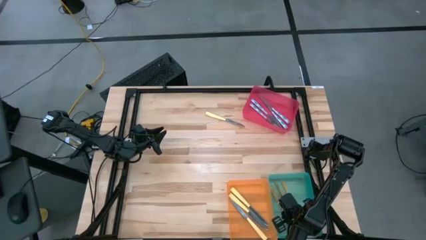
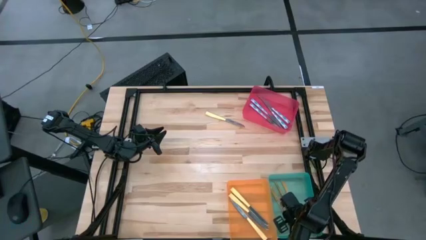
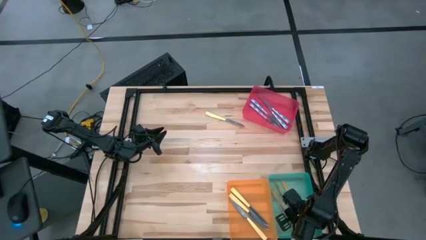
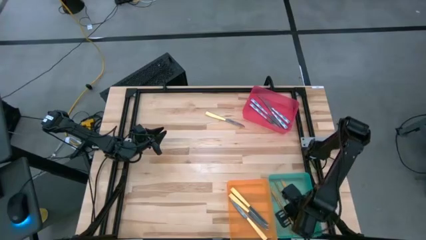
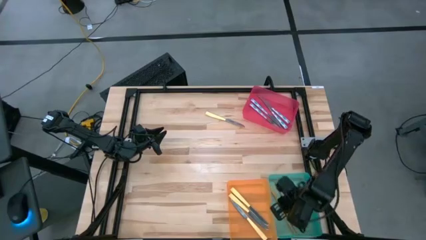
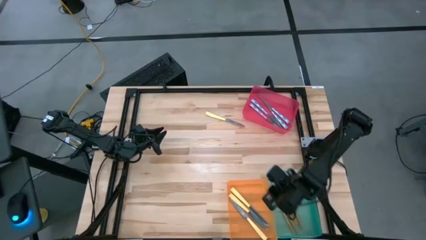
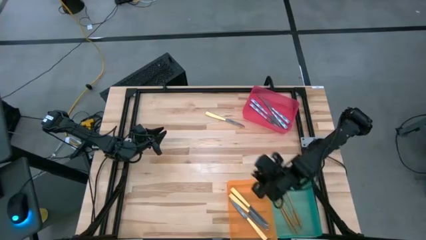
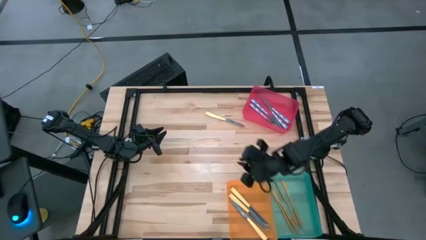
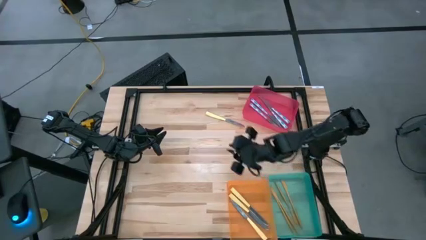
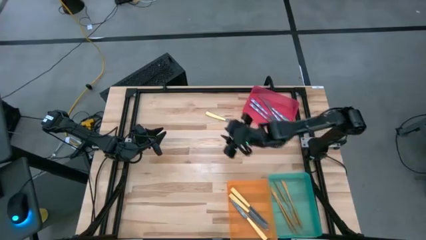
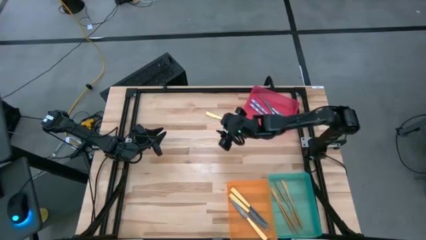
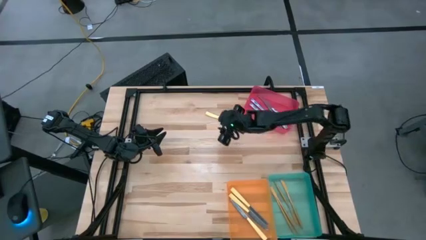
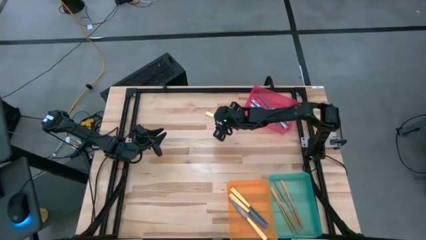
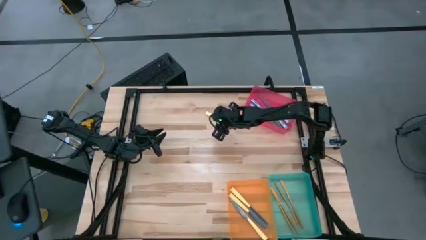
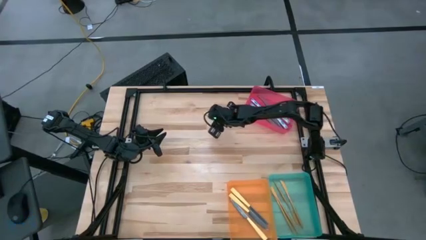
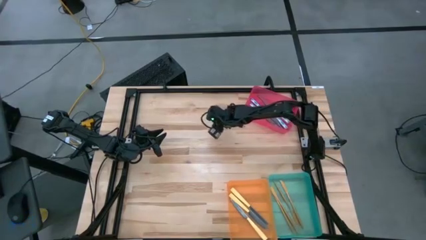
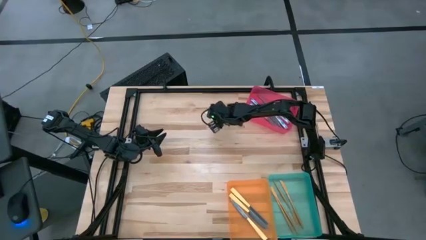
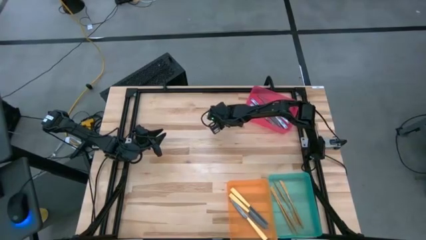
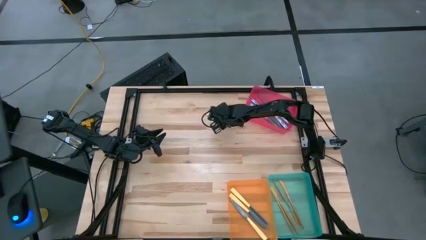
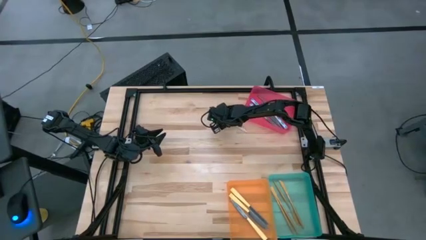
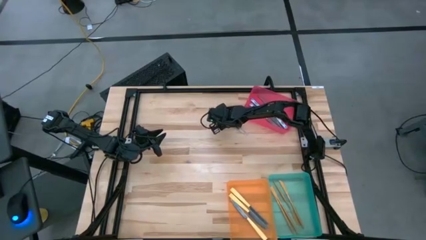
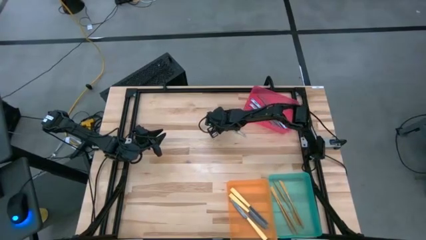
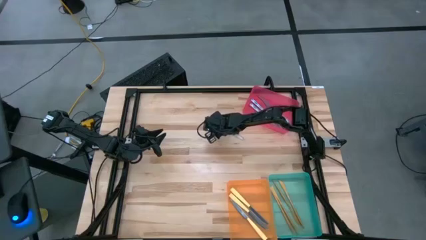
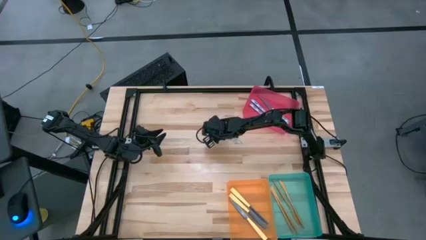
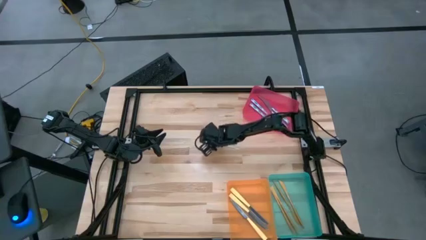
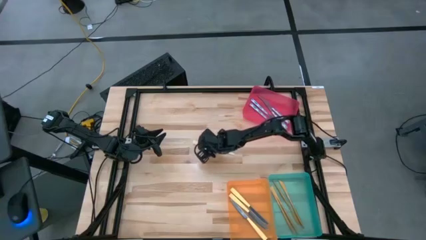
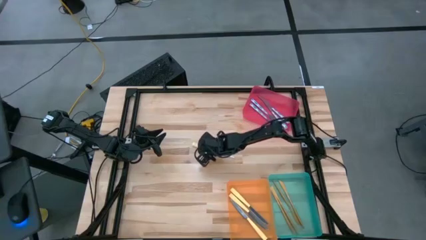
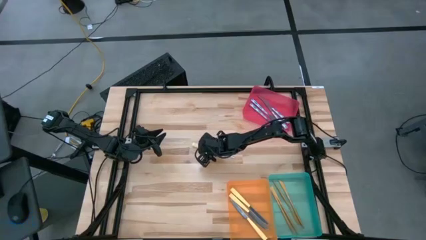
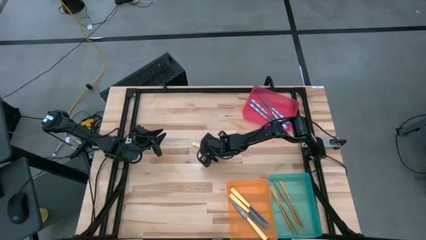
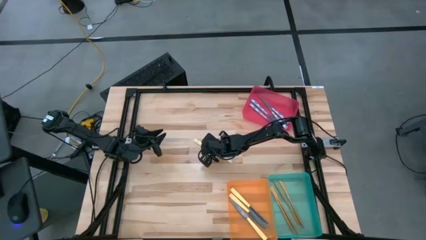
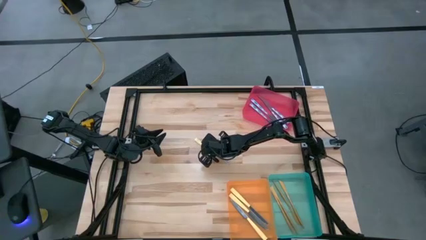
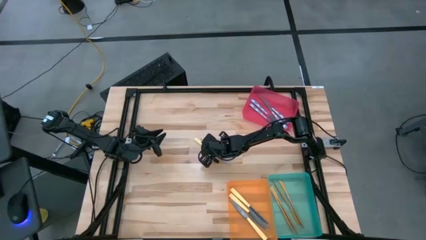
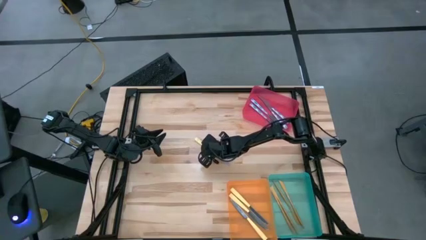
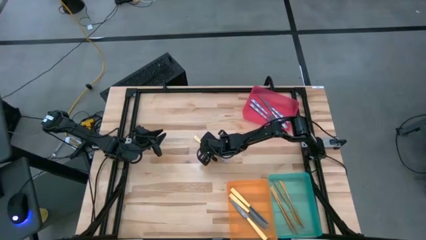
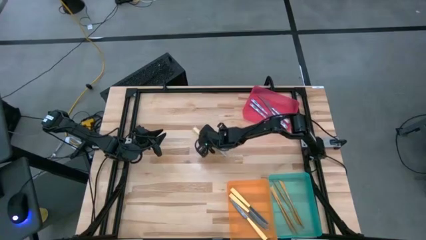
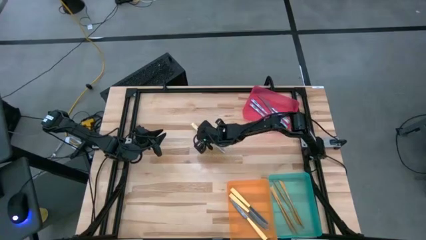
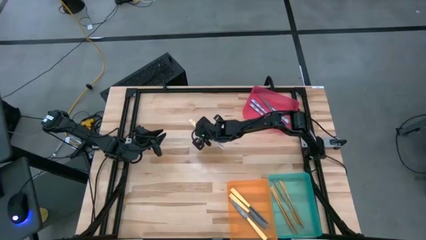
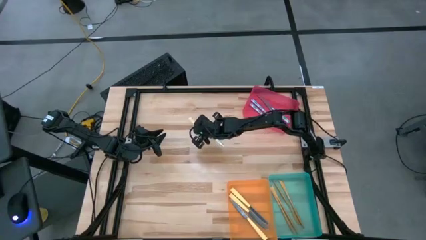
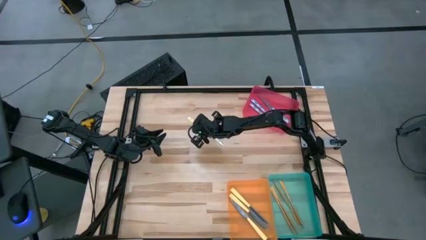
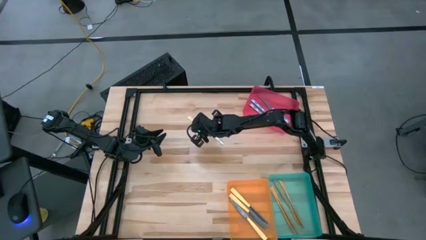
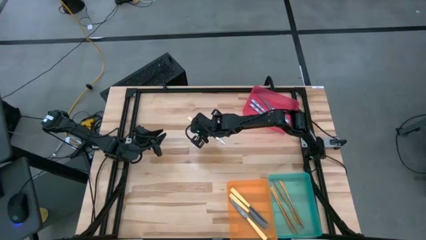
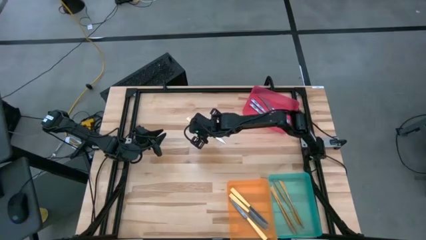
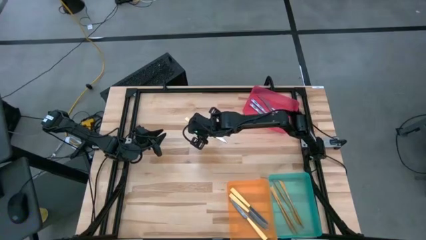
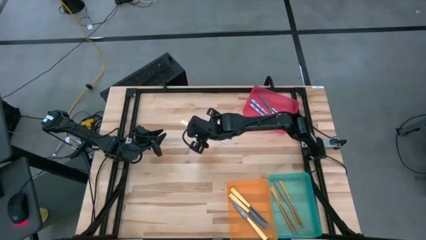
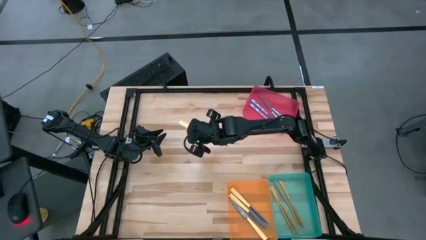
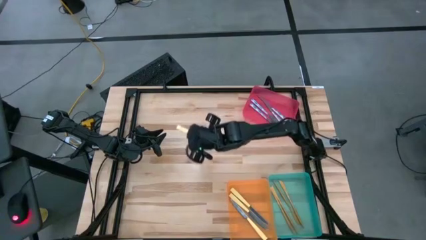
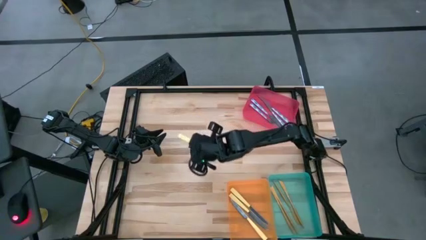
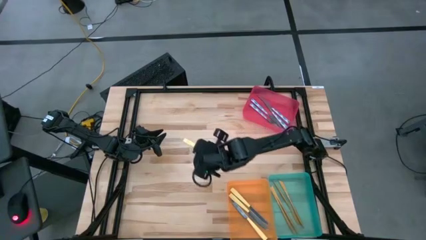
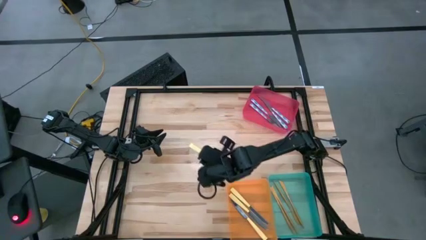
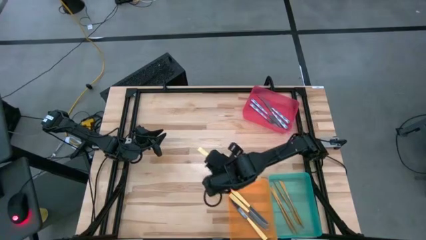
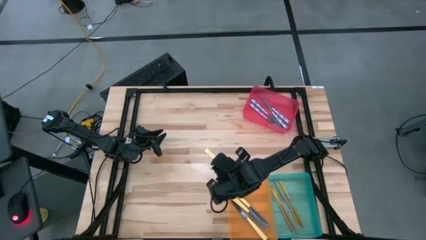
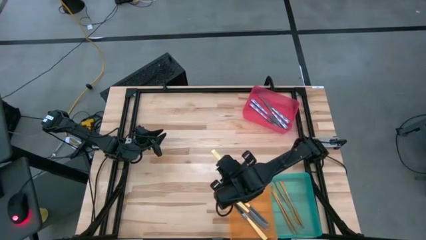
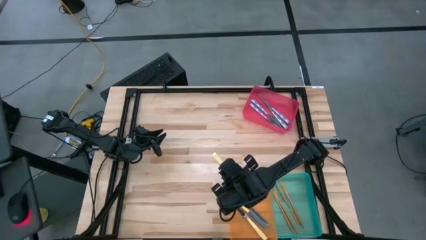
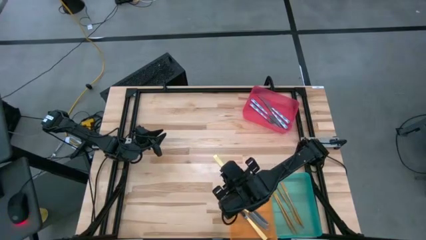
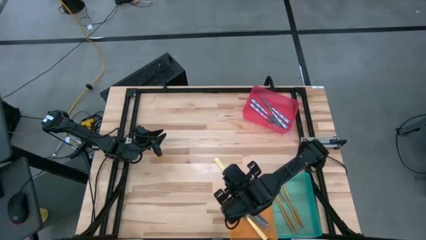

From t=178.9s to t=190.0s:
Task: Sort silverware by color (type)
Put the yellow knife into the orange bin

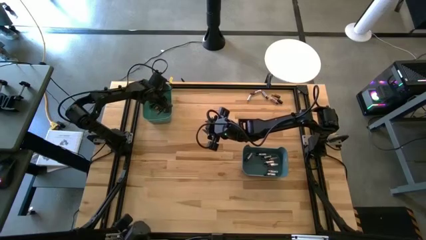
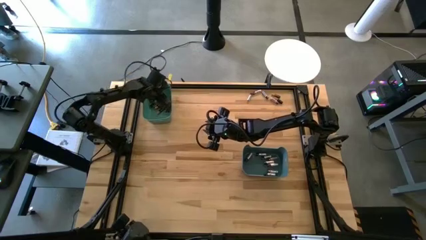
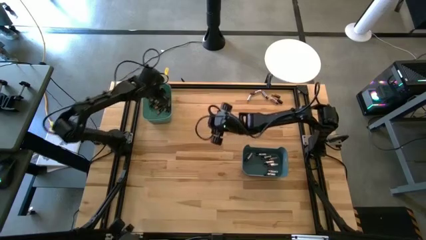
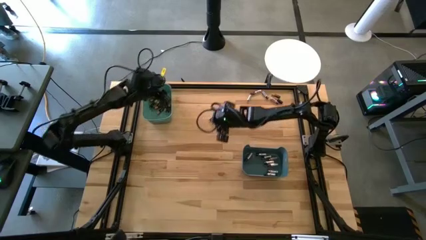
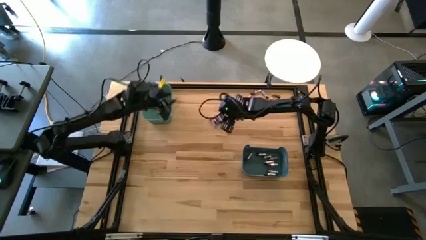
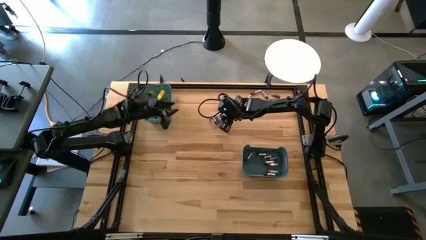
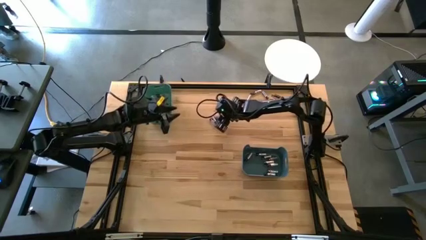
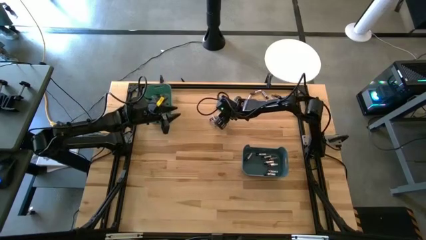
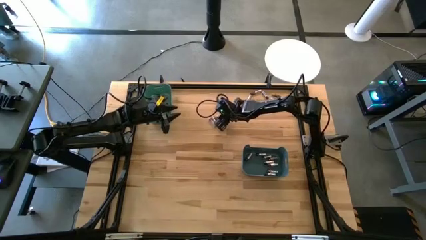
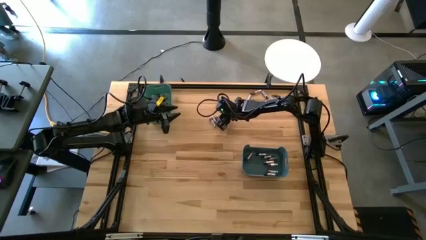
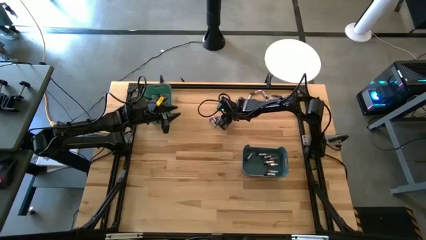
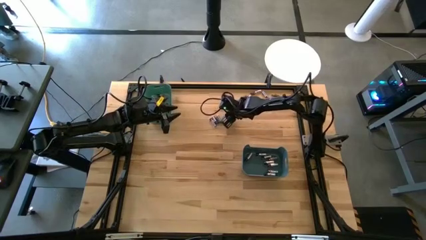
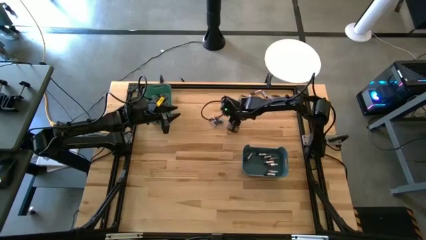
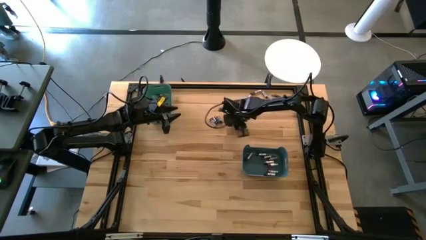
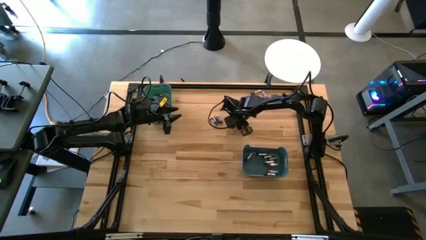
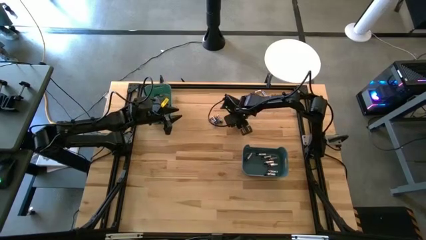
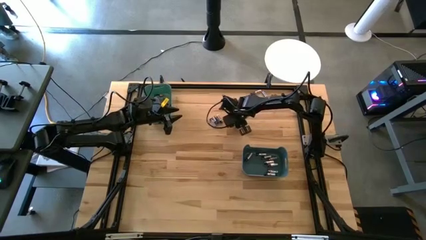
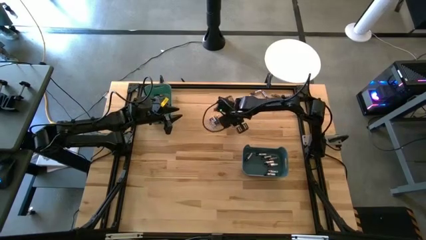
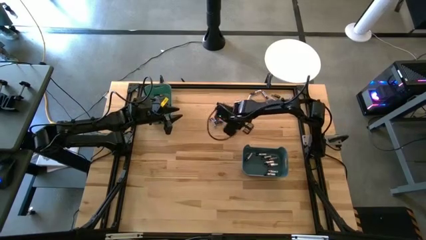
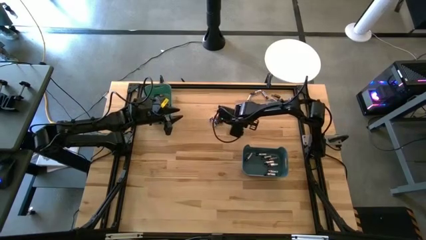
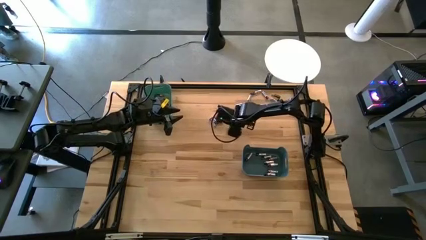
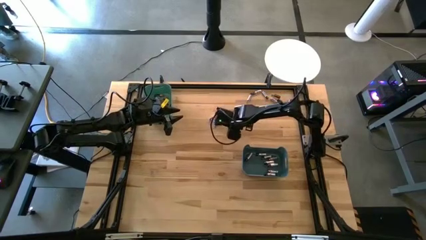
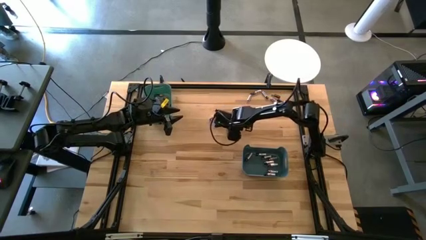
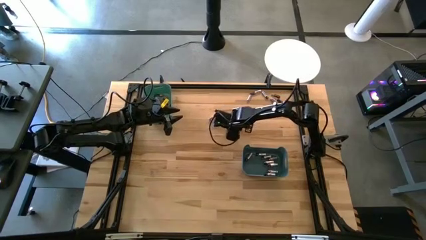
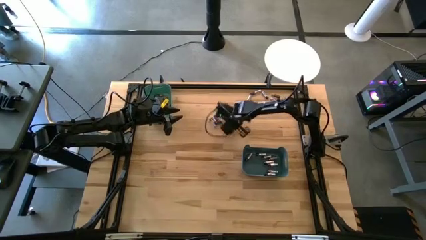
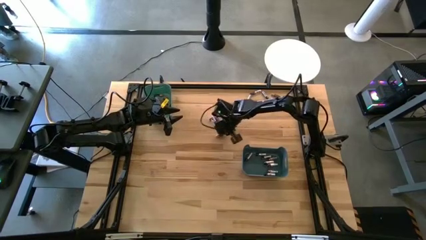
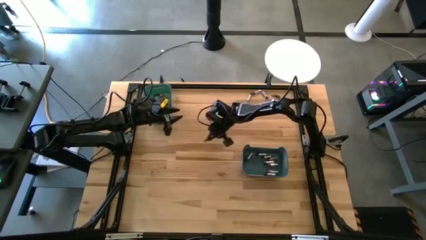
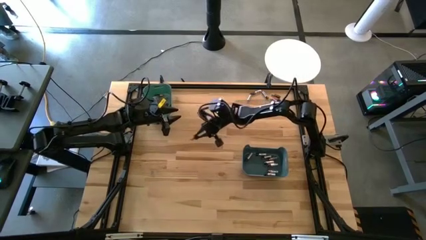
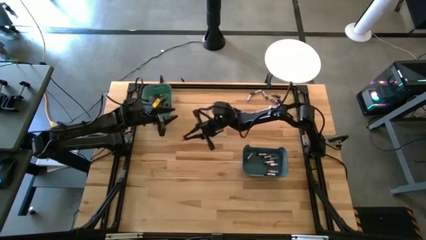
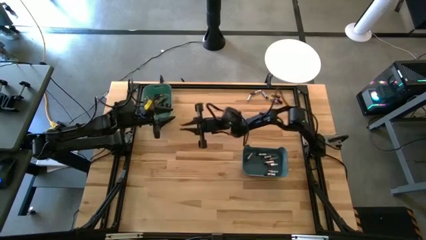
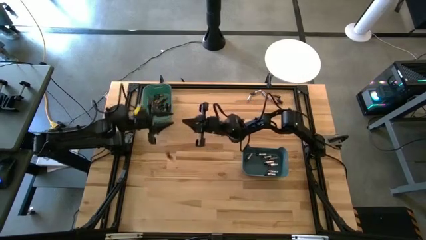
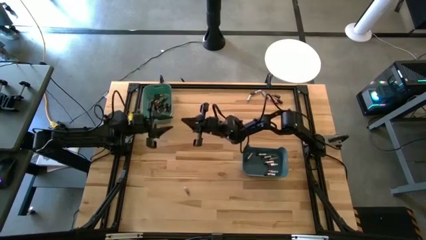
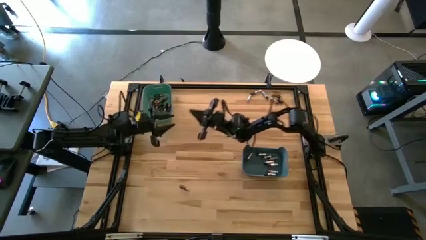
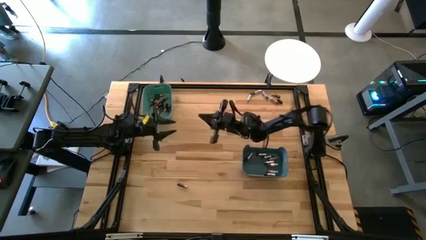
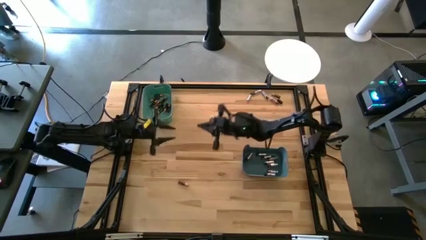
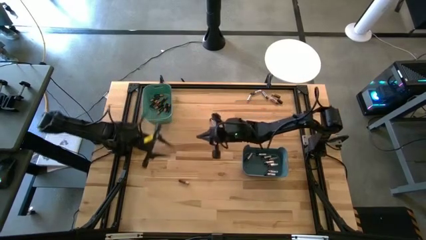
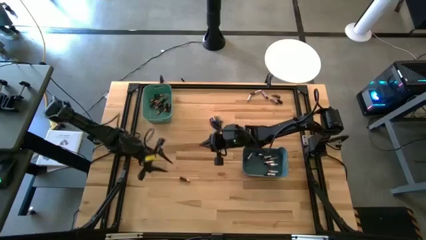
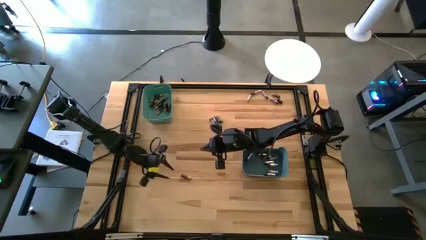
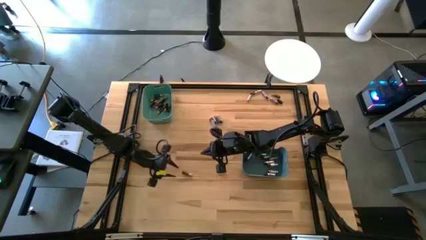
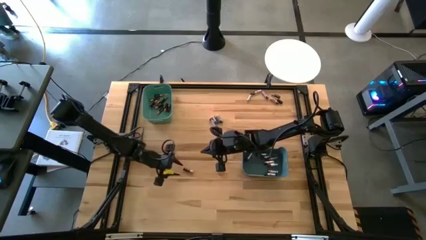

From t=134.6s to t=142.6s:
Task: Sort batteries
Put the black battery into the green bin
